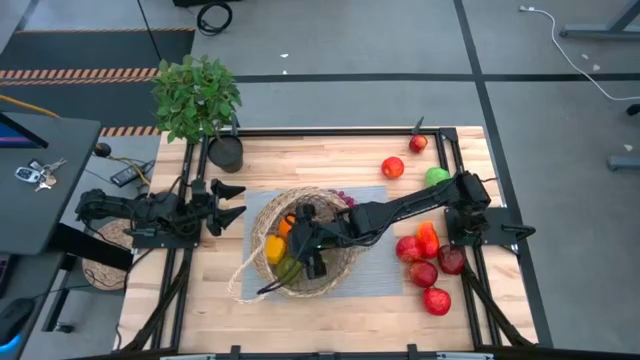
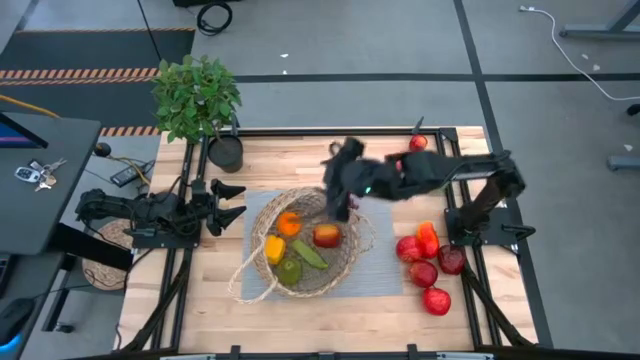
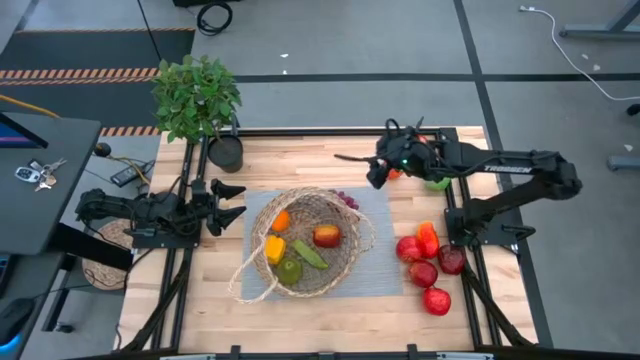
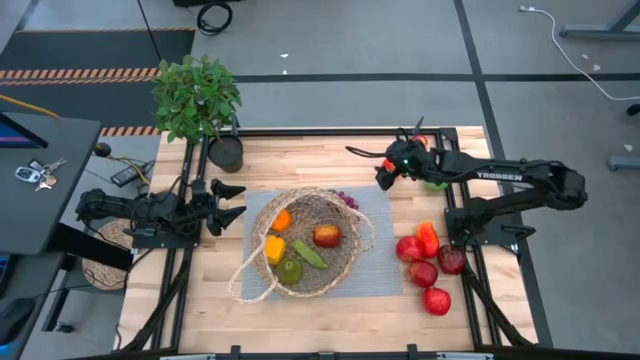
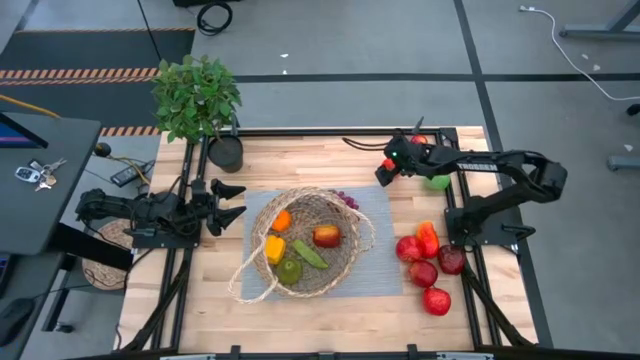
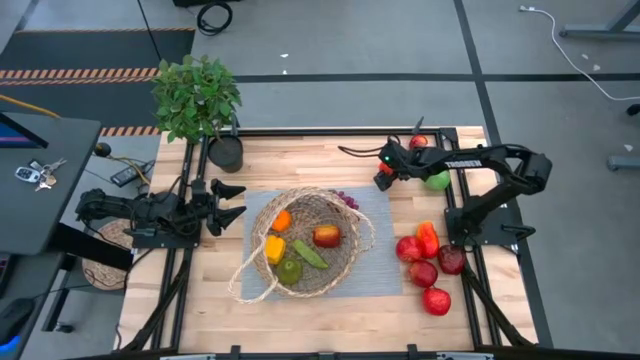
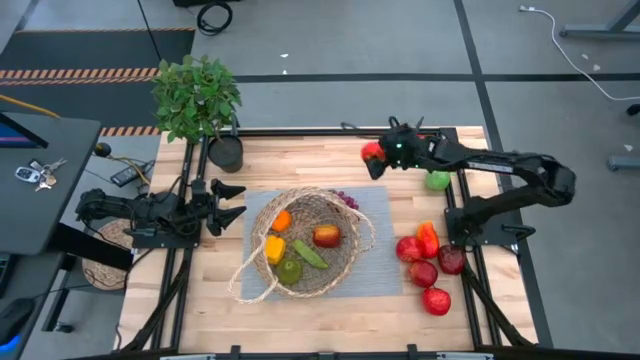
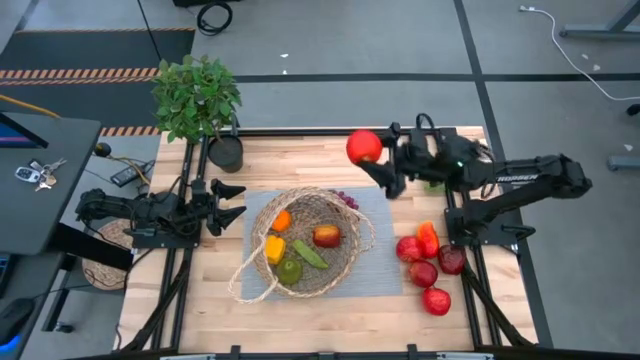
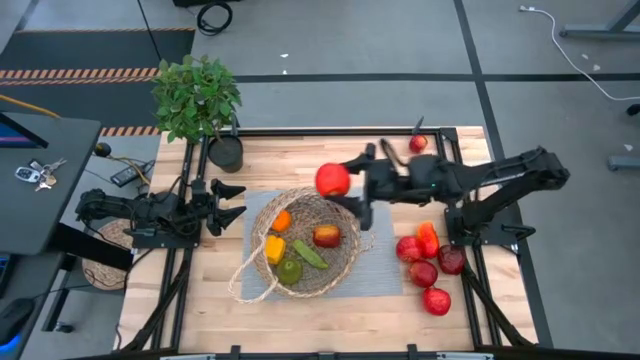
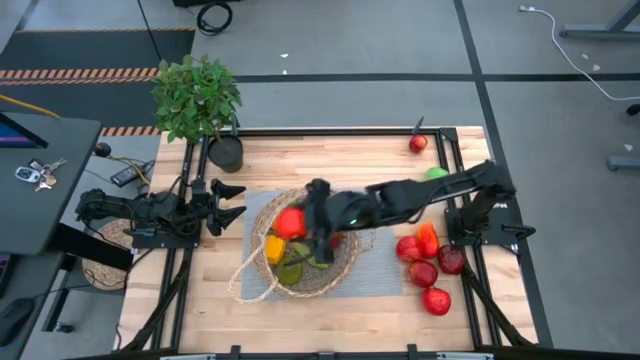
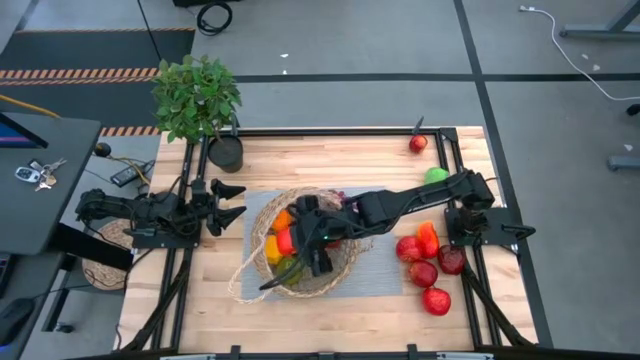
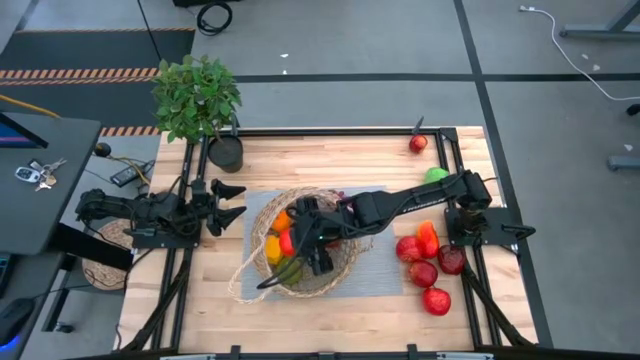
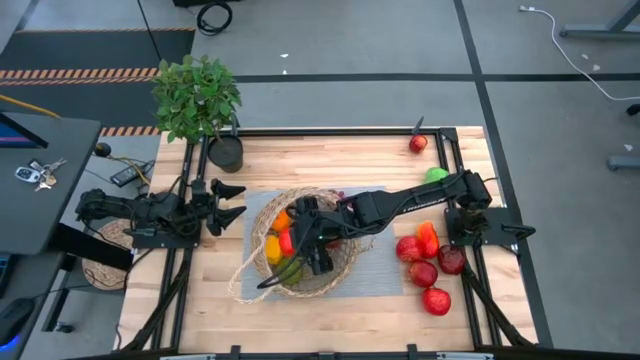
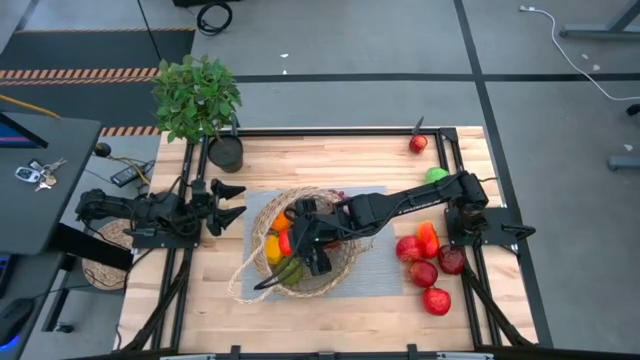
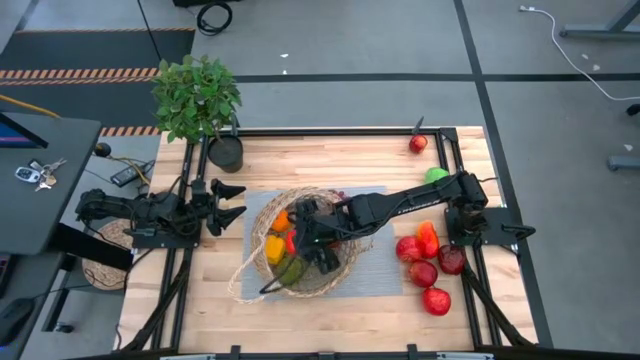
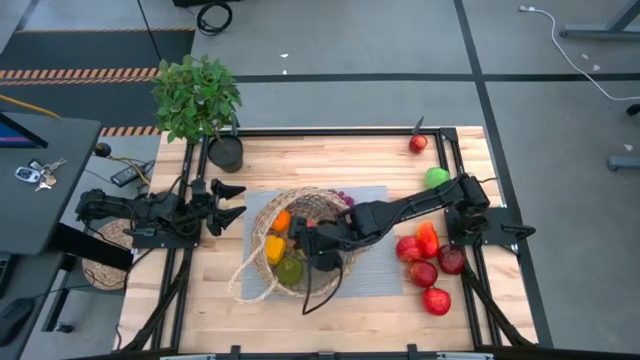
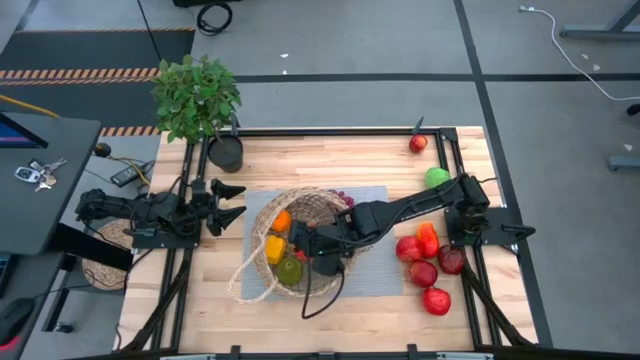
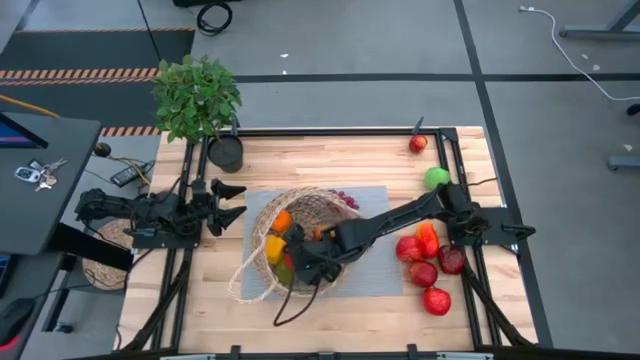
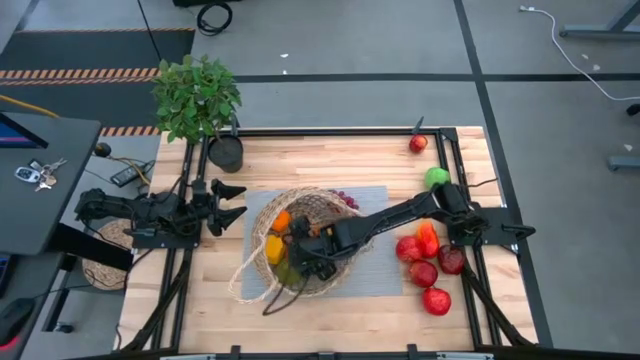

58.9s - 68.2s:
Task: Build produce basket
Put the red apple into the brown basket

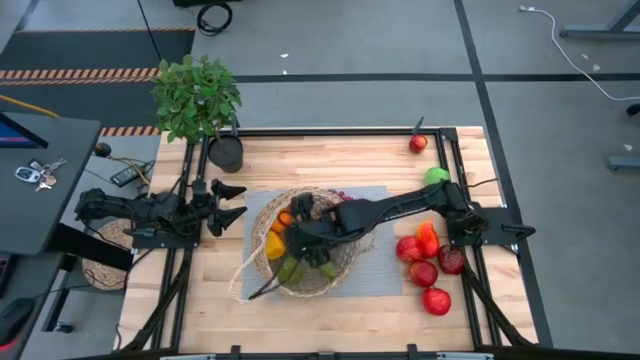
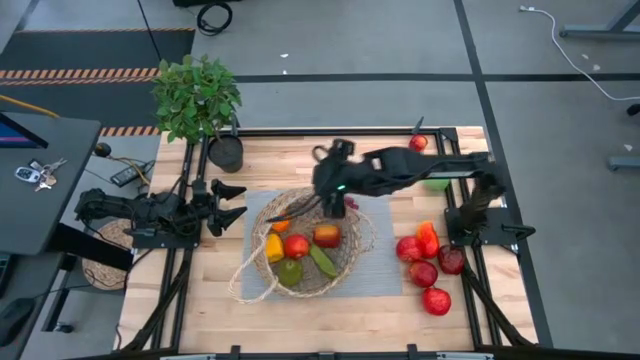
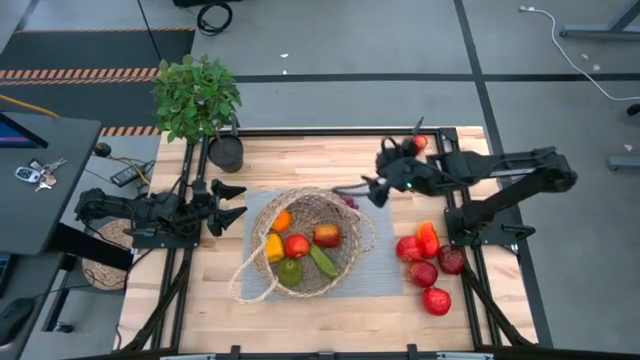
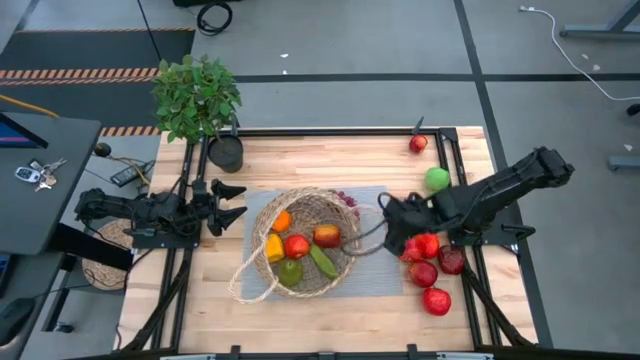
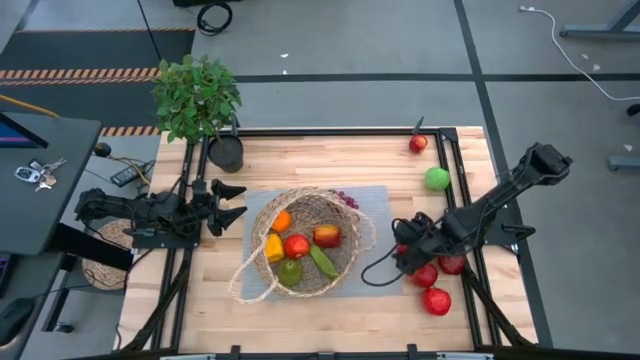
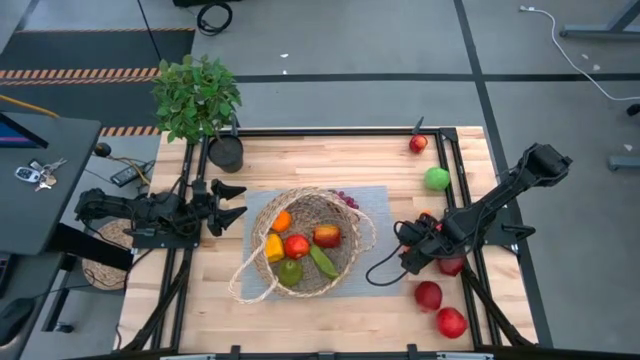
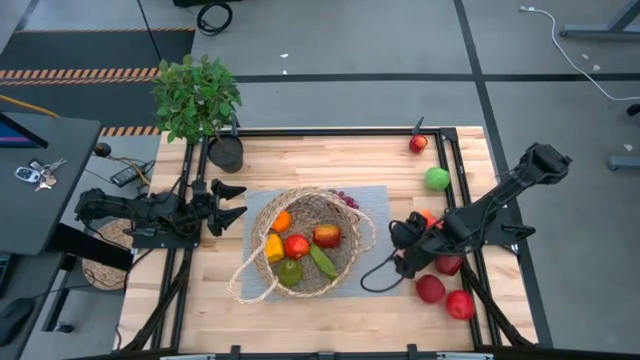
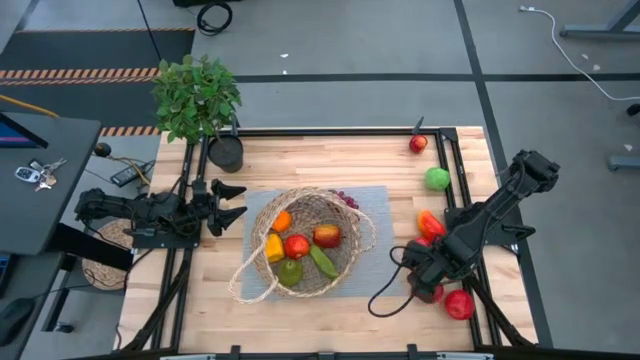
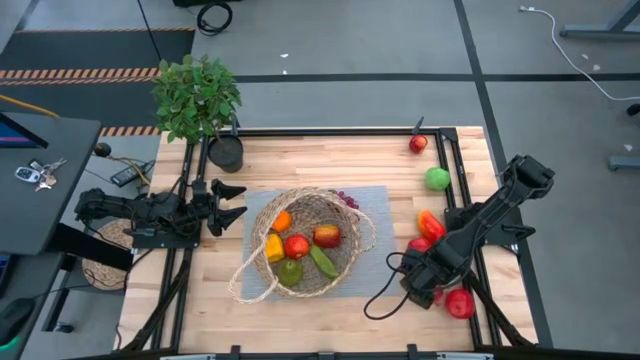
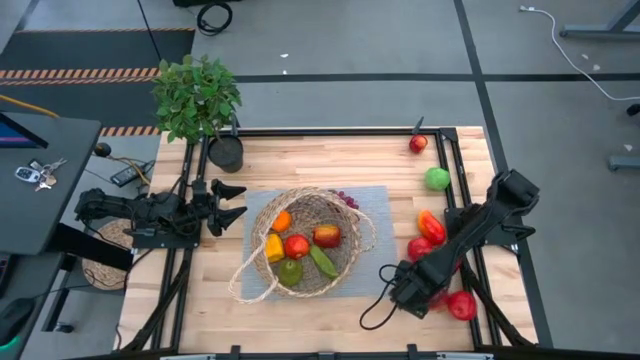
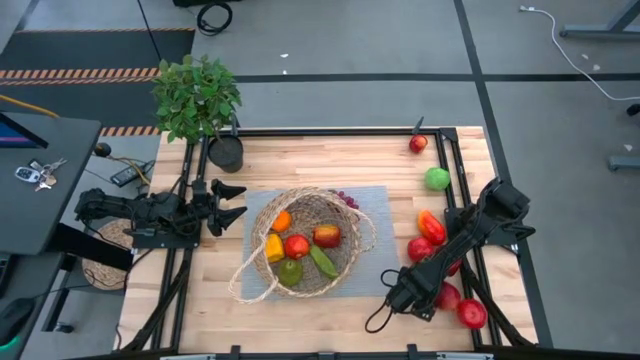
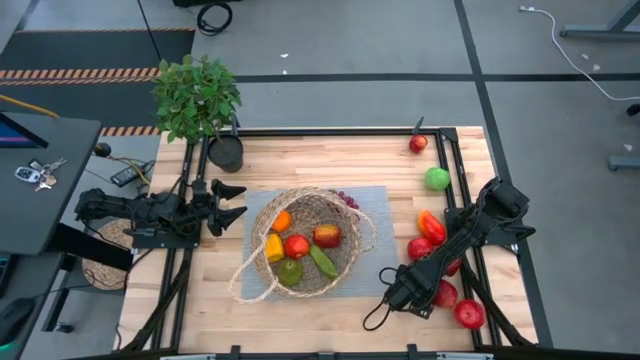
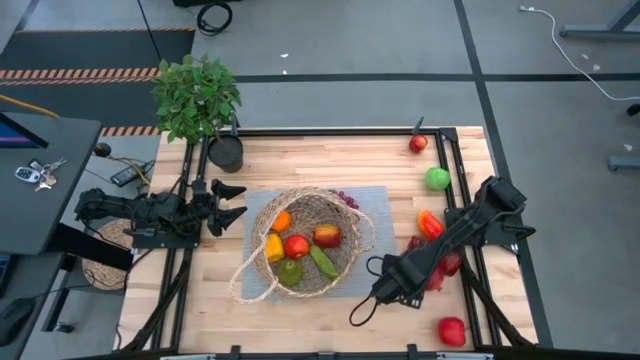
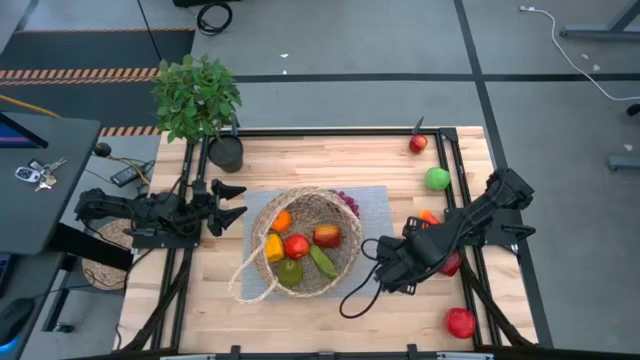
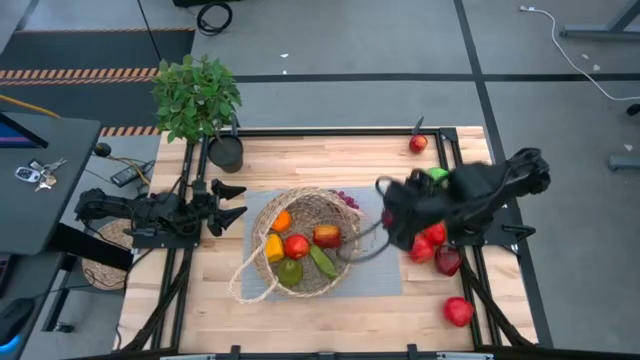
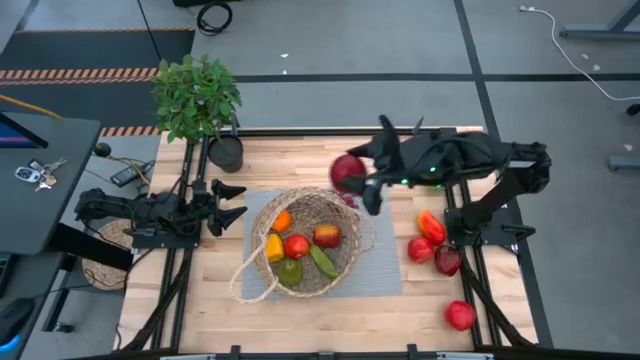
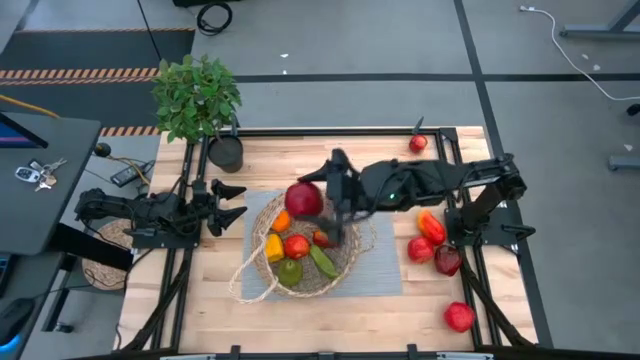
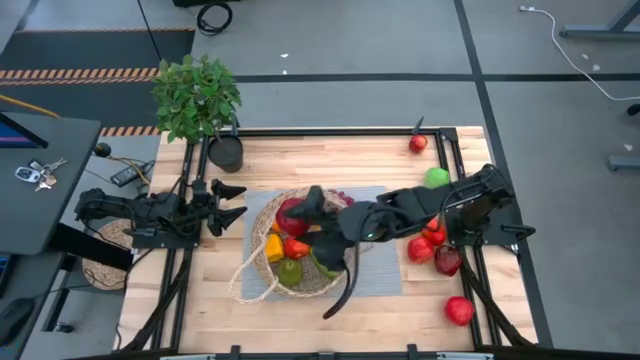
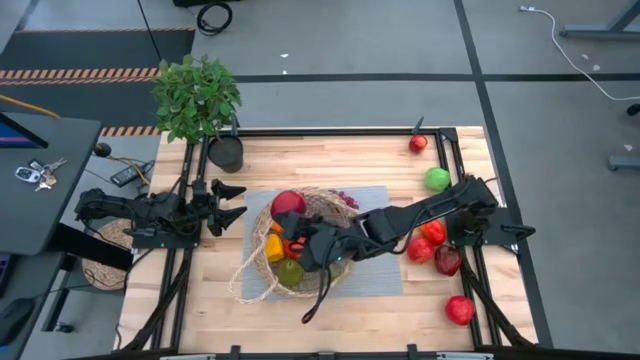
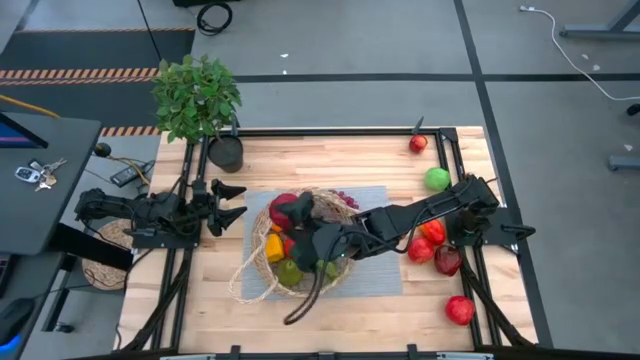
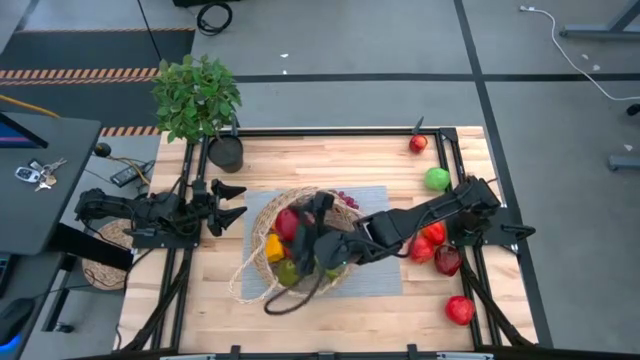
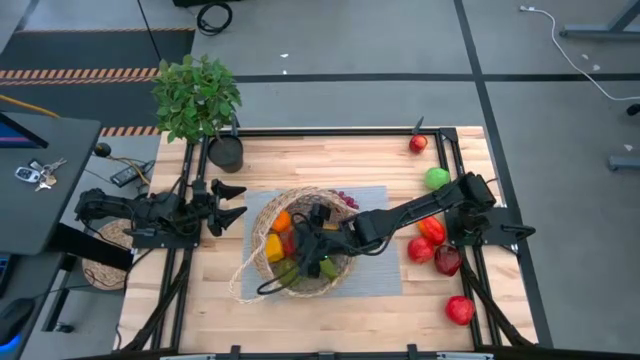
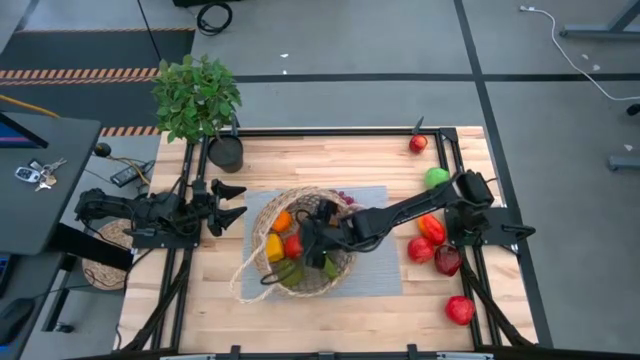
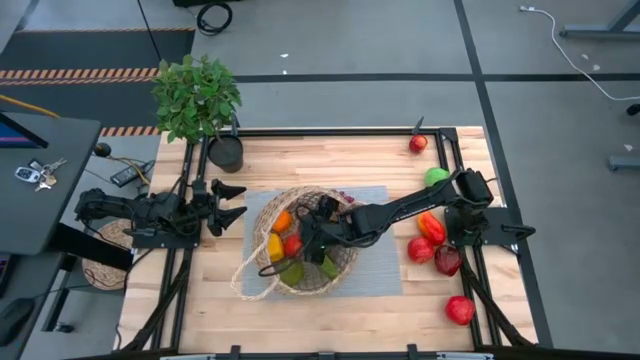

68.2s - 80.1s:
Put the red pomegranate into the brown basket
